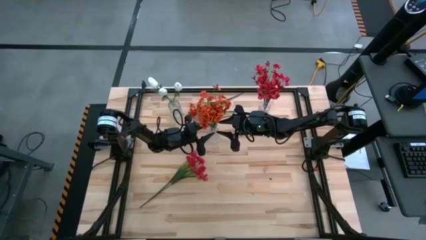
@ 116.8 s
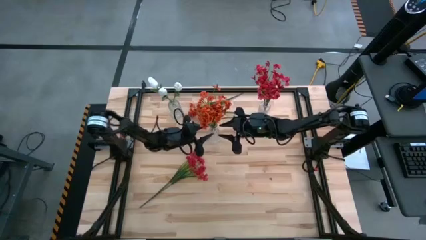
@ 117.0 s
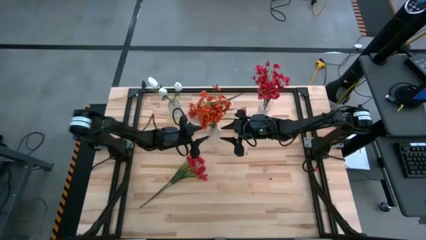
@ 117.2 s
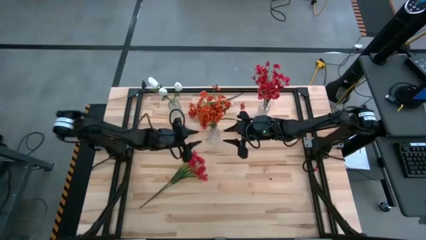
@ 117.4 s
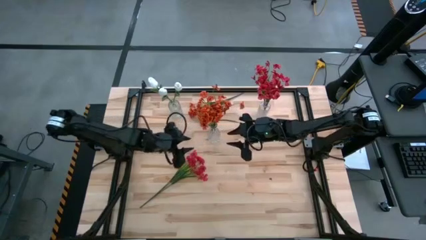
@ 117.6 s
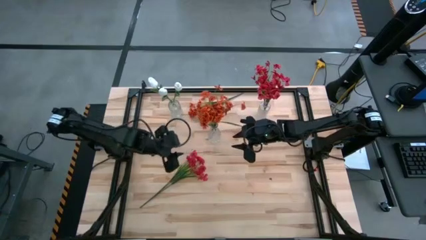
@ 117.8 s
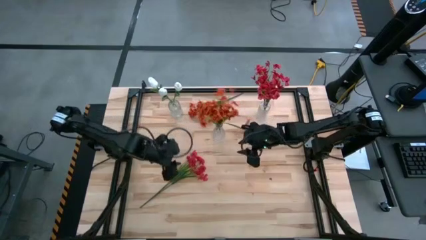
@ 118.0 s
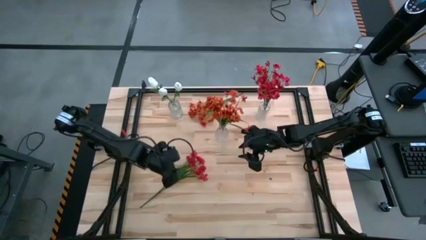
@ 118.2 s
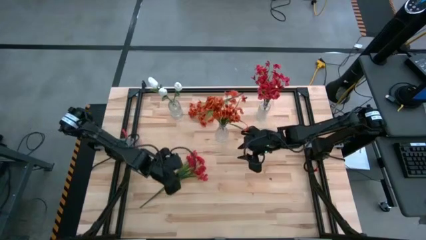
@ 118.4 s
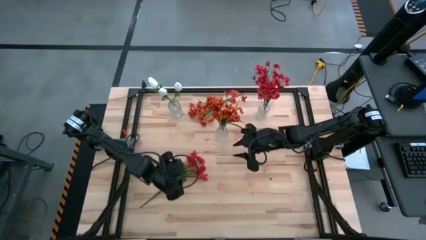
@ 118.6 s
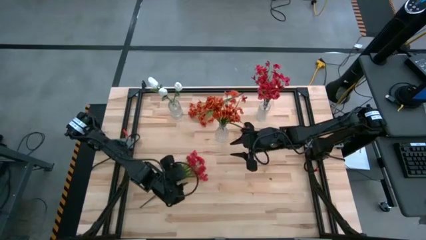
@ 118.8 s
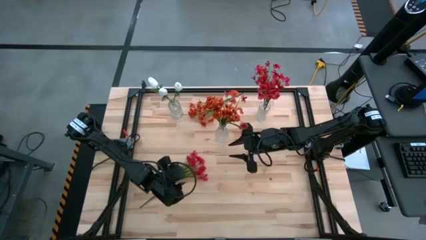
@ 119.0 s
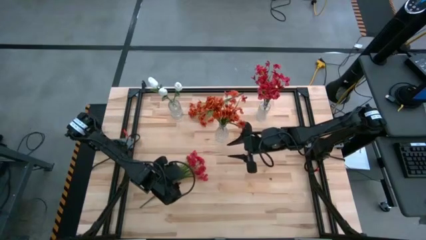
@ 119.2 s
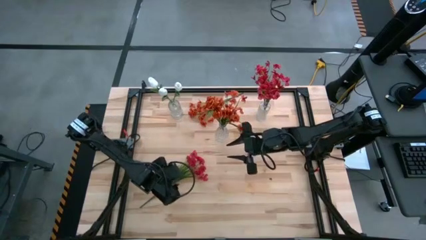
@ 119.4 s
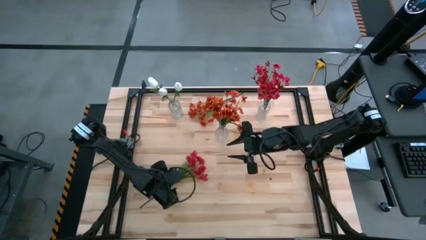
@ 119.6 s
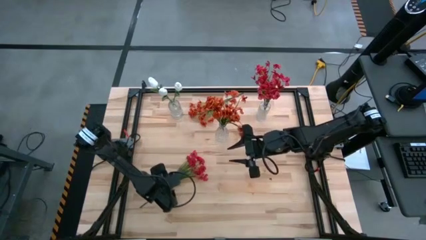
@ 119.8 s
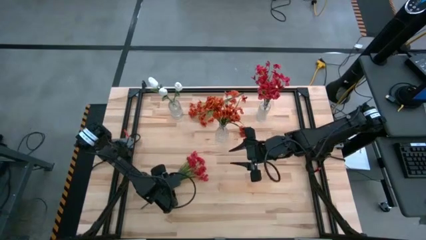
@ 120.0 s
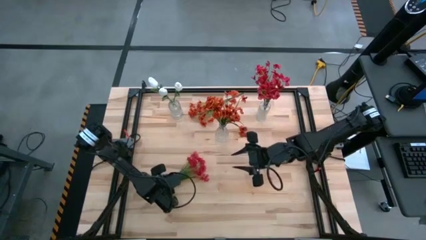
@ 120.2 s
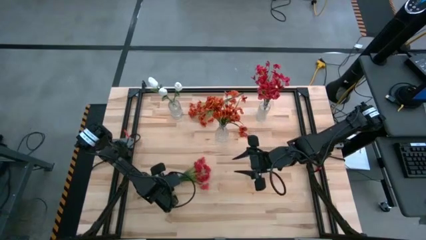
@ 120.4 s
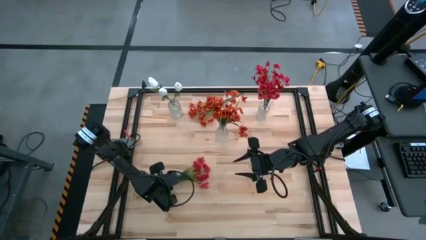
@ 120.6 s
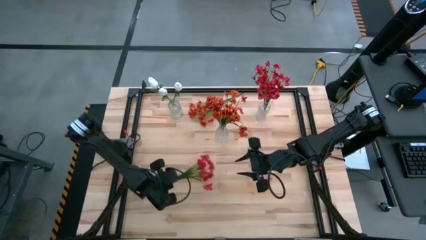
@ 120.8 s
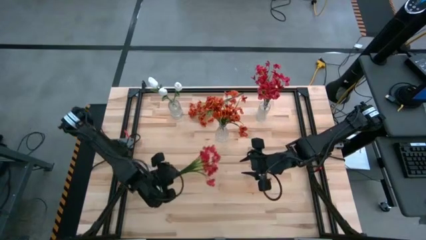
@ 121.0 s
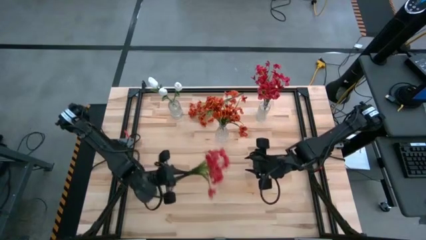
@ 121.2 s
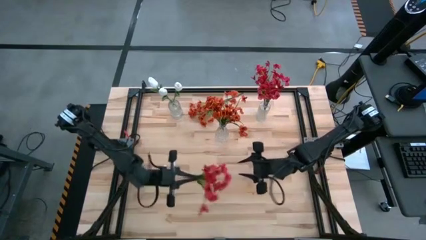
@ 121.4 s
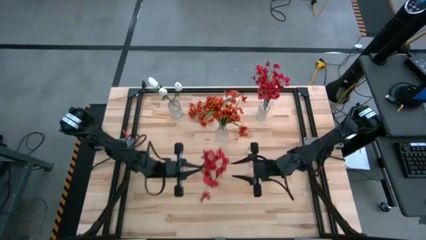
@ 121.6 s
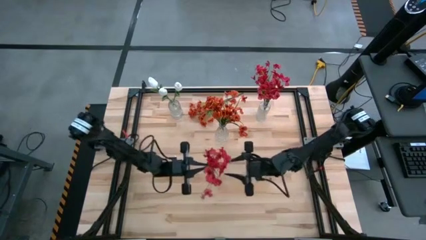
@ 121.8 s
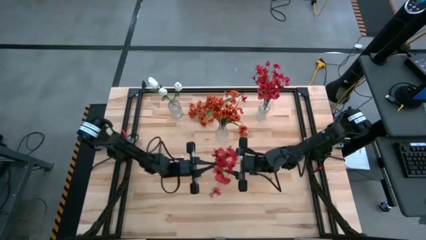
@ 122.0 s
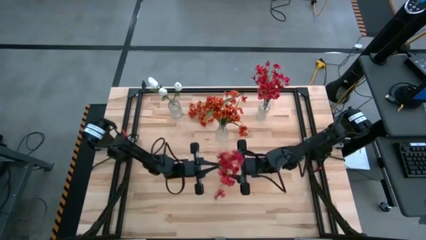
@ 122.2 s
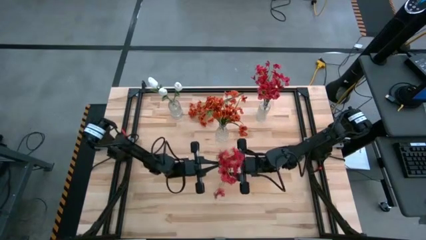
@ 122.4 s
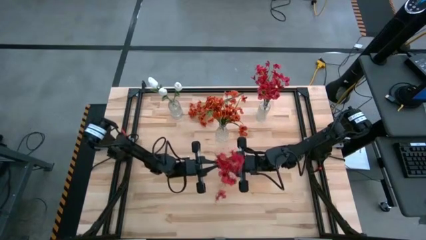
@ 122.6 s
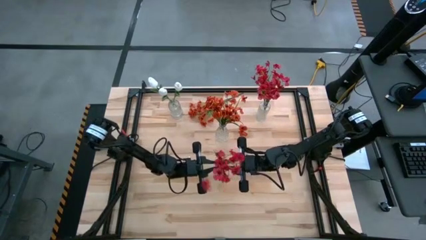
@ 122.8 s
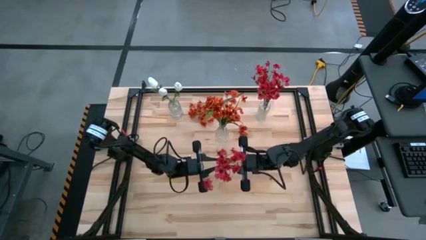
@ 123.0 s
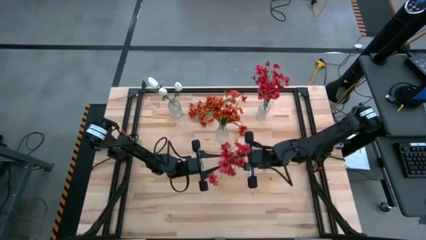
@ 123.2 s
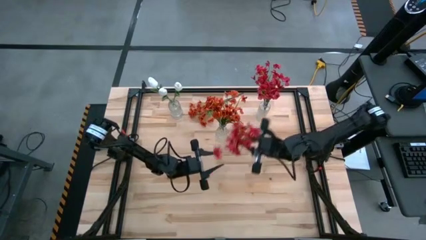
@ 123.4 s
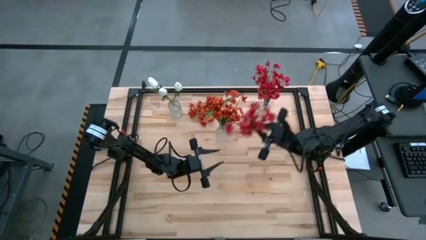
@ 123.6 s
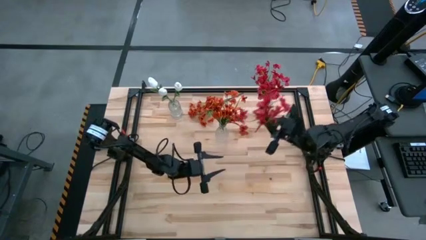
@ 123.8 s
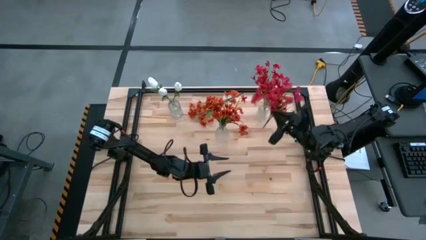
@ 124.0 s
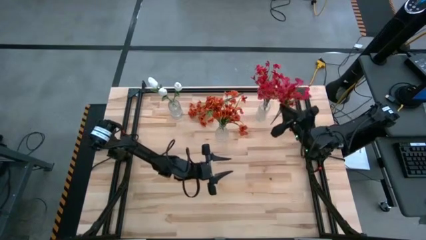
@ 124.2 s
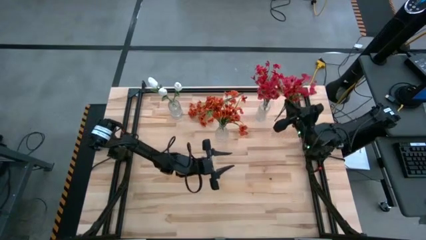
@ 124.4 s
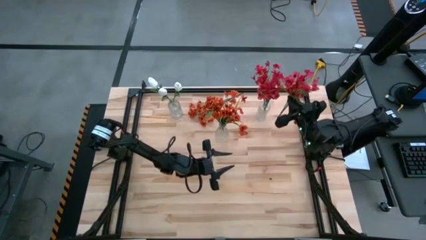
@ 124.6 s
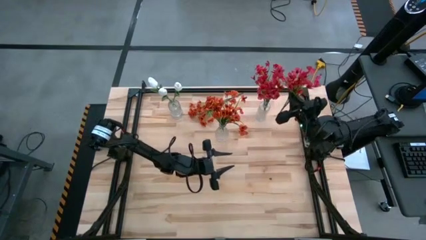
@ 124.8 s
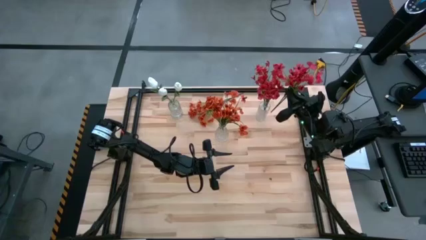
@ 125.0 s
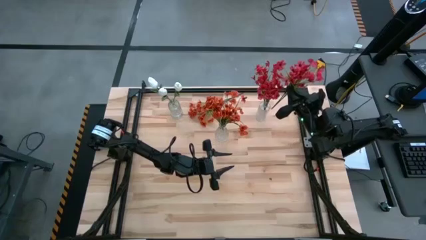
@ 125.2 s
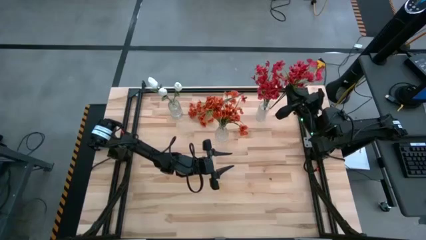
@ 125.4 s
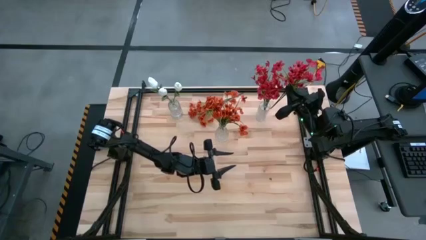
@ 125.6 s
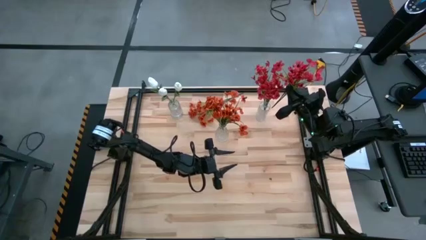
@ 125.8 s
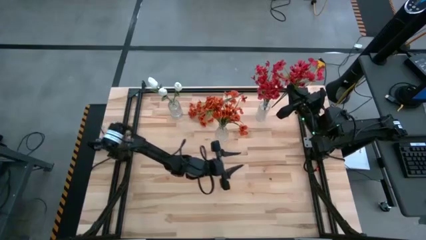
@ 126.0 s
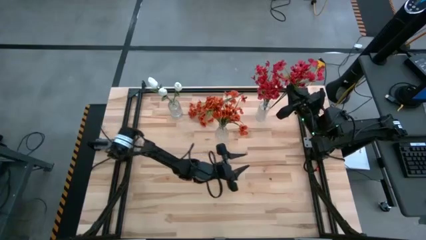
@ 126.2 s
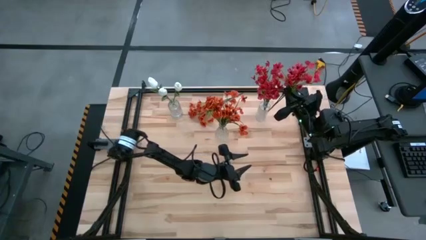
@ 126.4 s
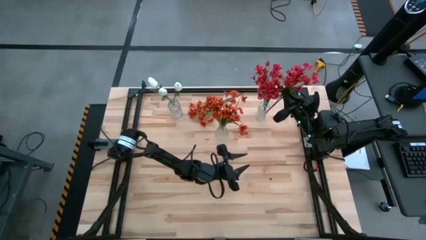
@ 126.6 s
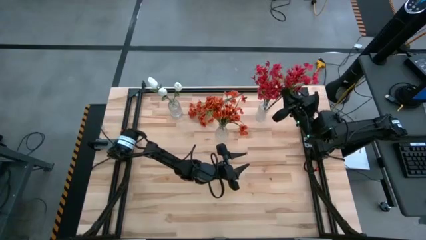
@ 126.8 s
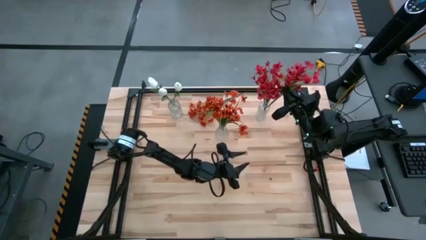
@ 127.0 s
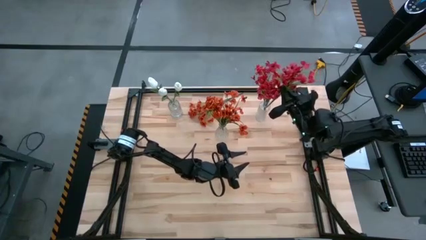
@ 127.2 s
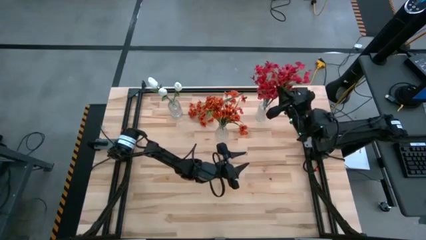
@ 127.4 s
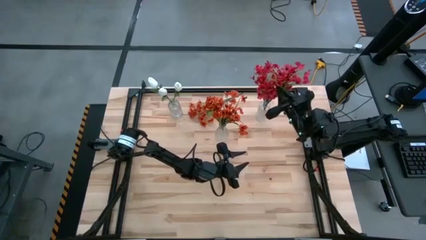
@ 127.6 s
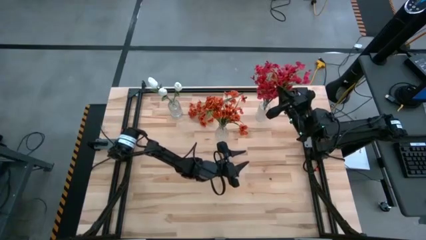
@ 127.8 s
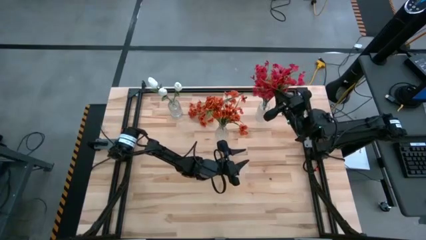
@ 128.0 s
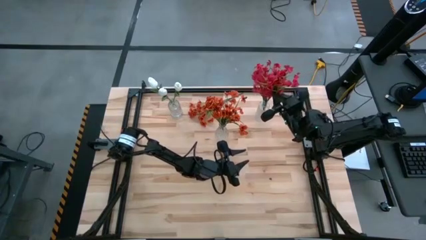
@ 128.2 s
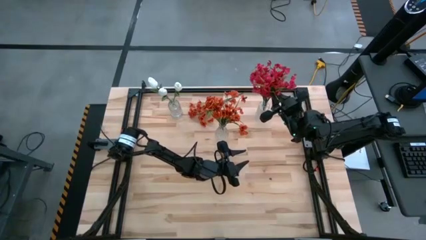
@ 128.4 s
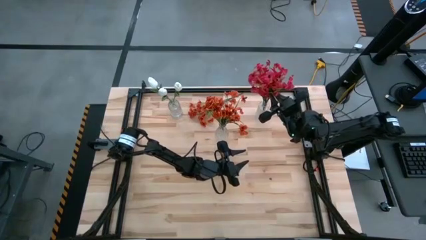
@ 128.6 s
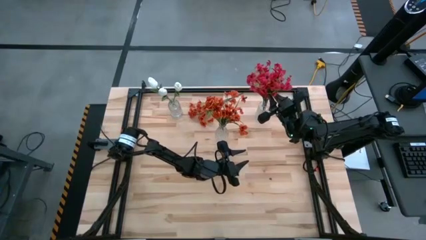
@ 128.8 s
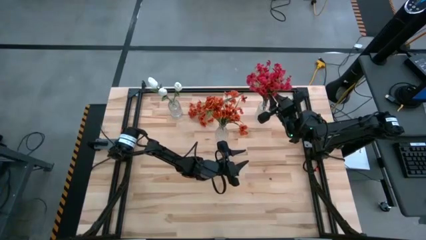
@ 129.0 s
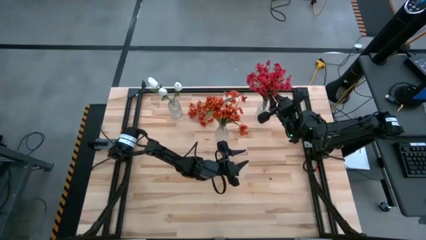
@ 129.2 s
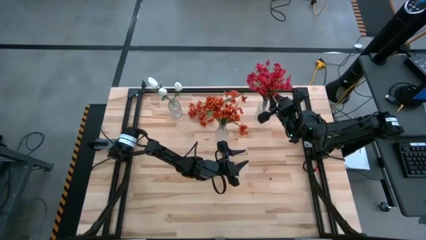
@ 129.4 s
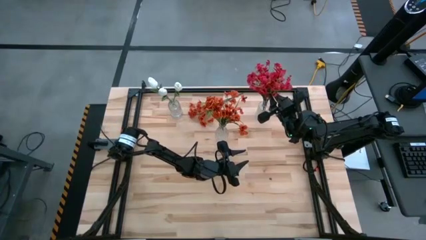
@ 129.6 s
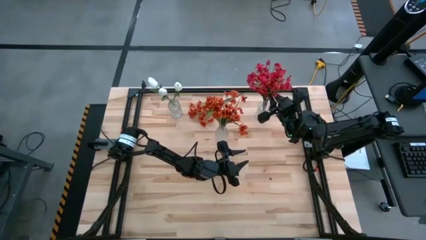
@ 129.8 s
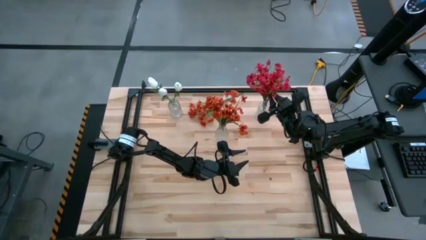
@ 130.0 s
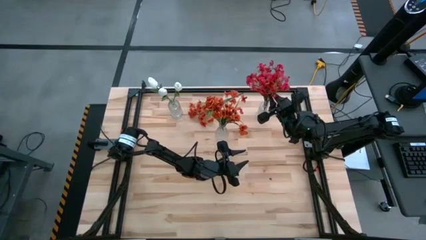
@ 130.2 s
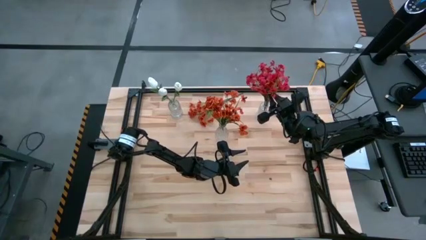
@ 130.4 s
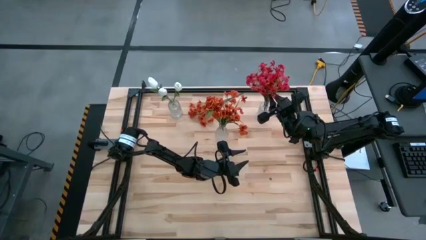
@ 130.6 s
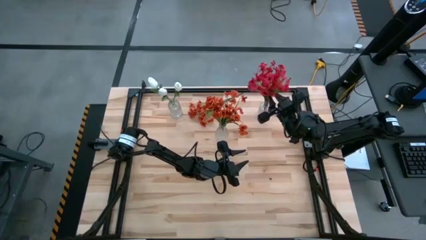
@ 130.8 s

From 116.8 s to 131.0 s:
Task: Sort flowers into vase by color
Put the red flowers into the top right transparent vase

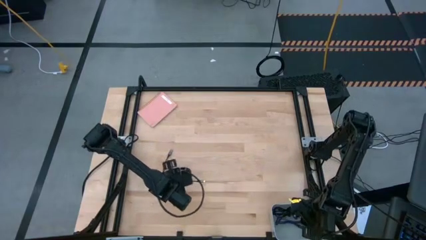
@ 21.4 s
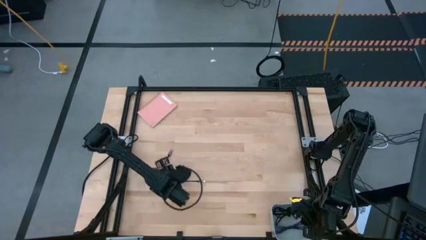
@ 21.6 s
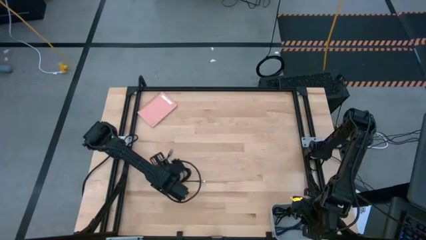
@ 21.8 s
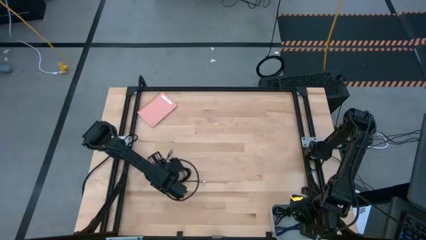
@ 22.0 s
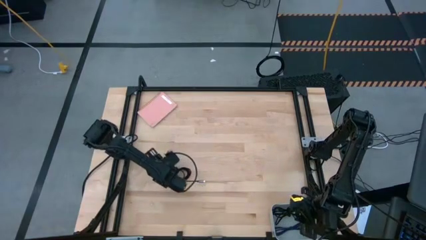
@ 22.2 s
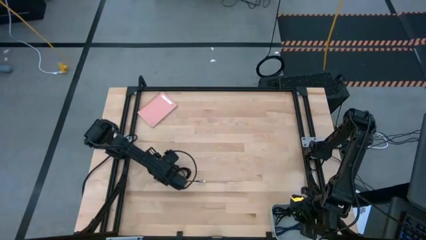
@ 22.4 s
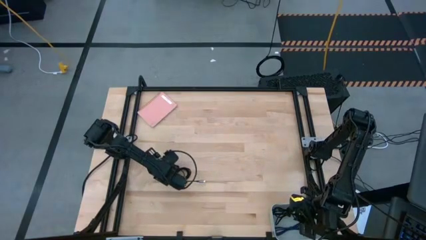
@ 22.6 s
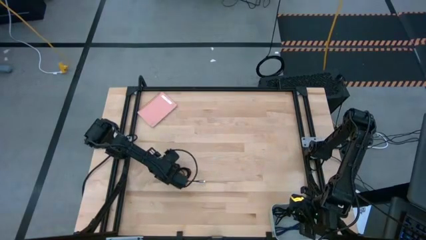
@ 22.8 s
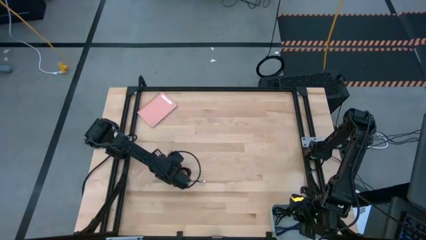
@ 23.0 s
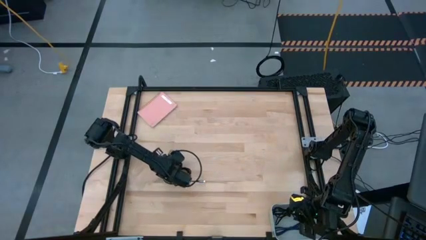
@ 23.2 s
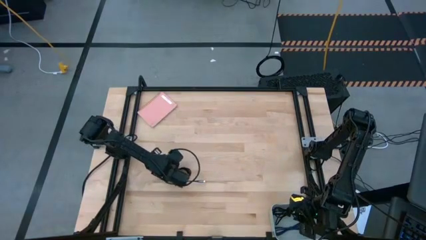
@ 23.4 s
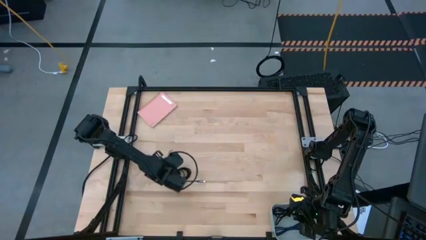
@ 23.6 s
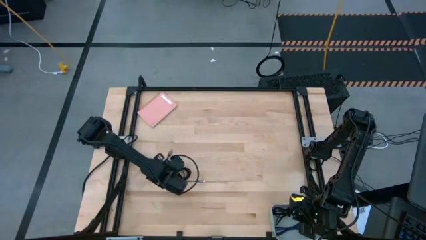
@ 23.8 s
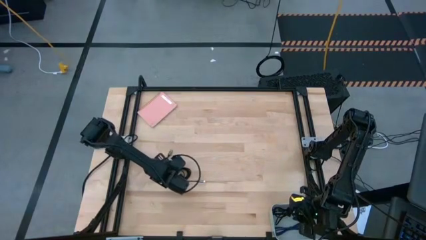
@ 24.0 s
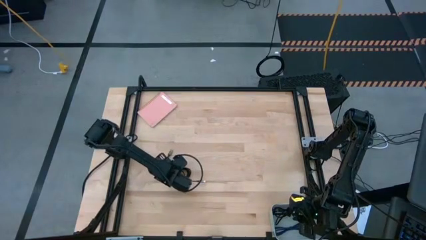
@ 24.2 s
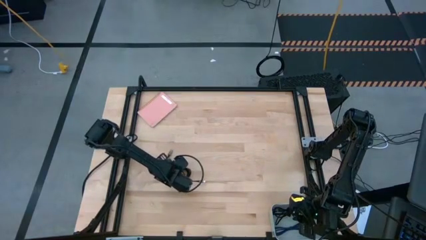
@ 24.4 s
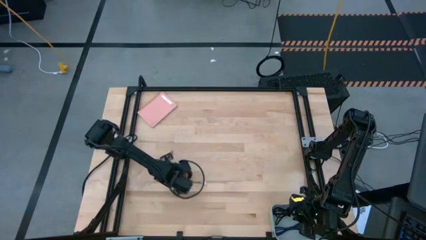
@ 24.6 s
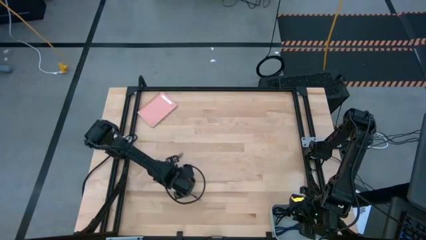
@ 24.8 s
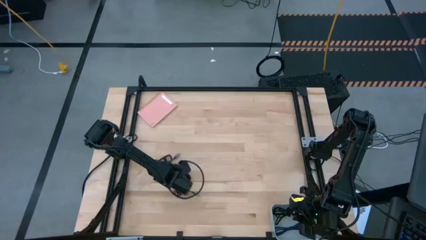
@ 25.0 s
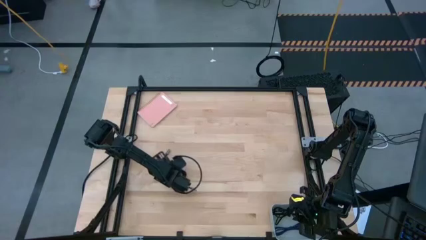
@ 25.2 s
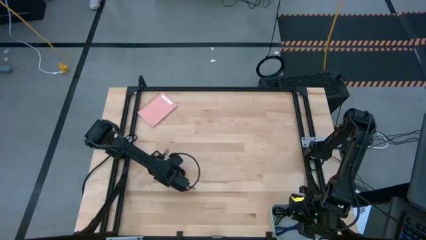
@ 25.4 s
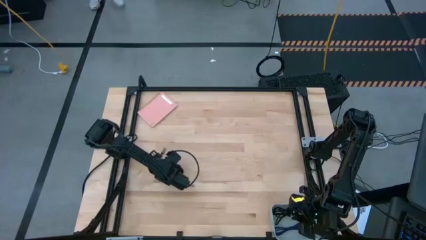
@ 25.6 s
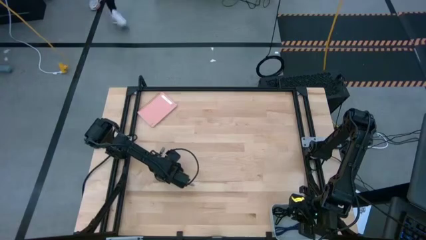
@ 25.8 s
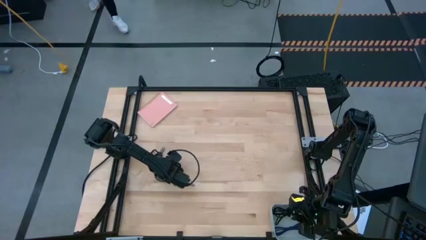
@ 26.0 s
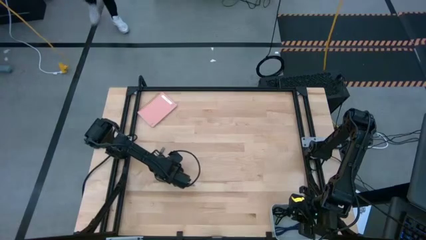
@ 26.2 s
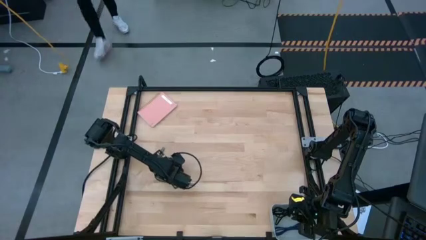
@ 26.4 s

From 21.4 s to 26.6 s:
Task: Pick and place USB-C Cables
Put the black charger cable into the bin
